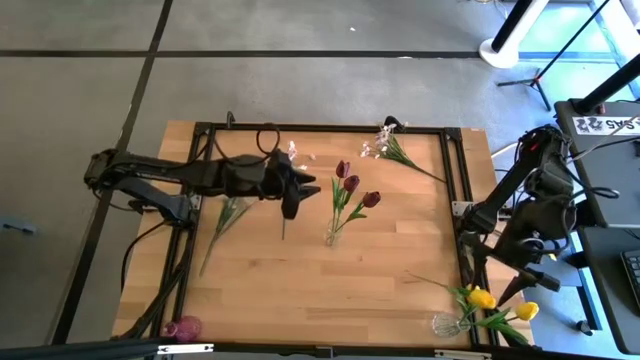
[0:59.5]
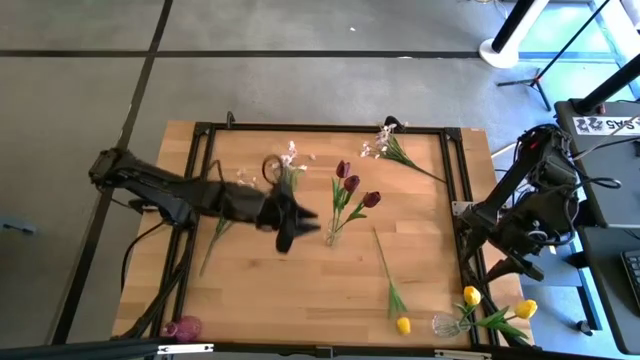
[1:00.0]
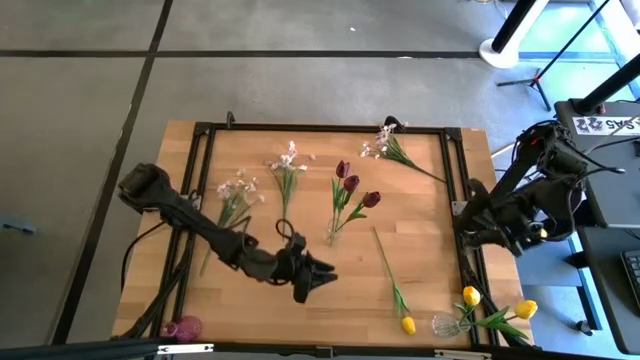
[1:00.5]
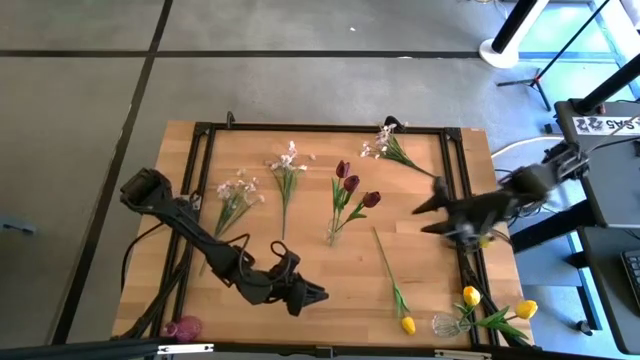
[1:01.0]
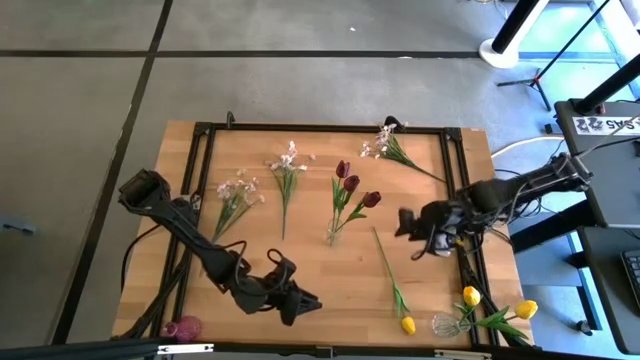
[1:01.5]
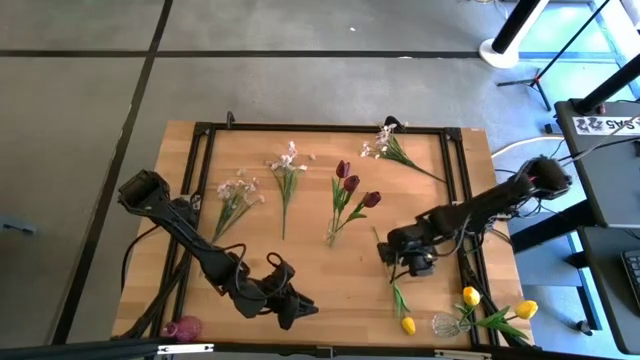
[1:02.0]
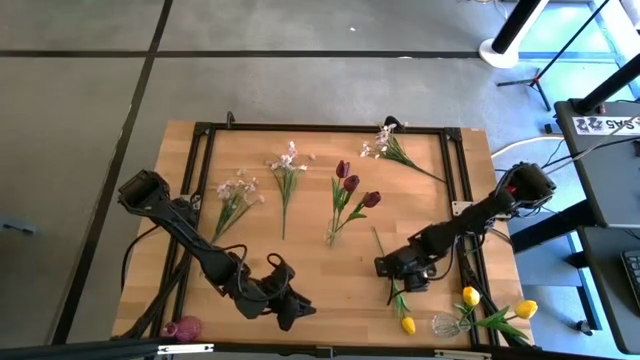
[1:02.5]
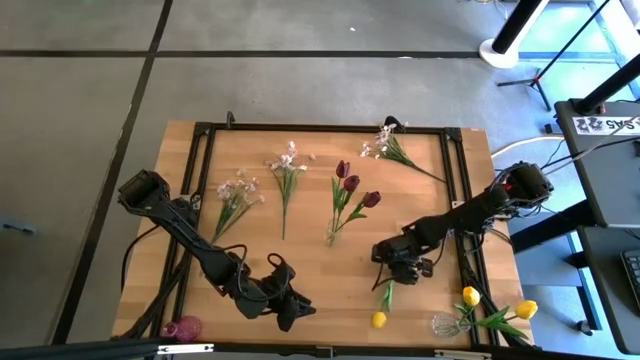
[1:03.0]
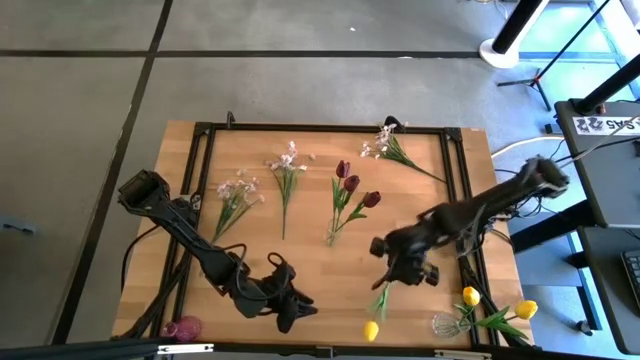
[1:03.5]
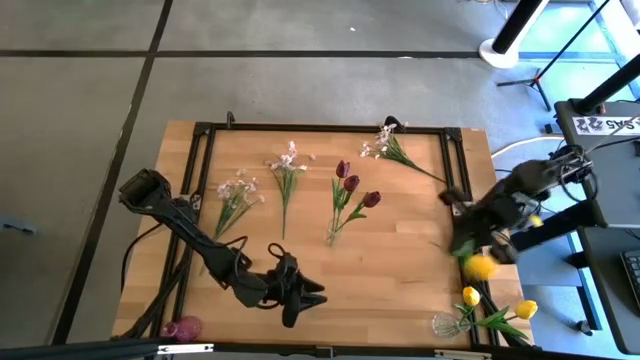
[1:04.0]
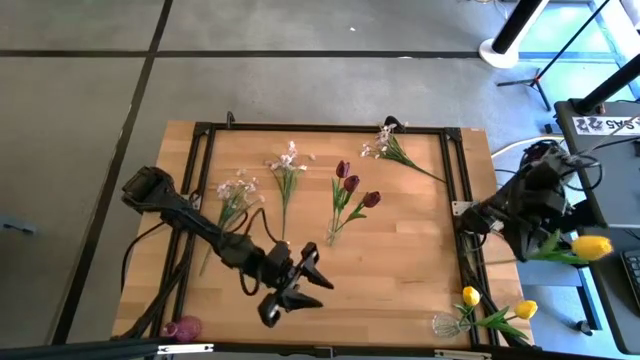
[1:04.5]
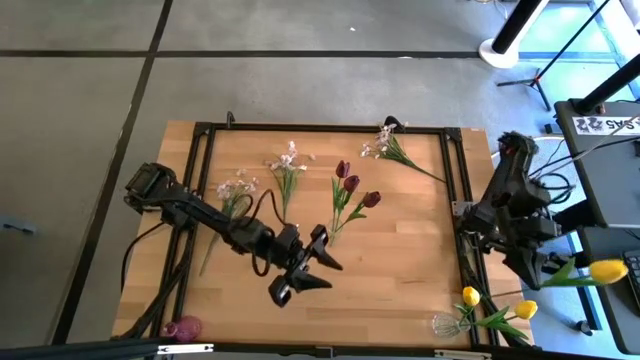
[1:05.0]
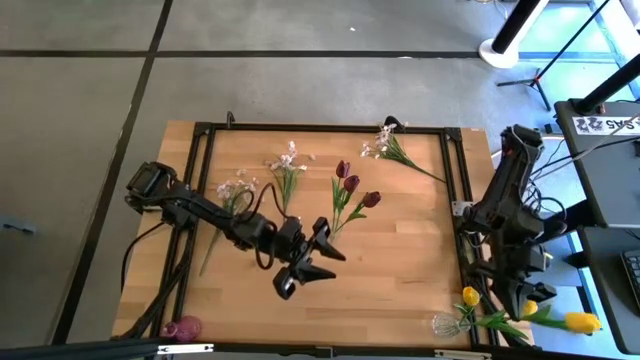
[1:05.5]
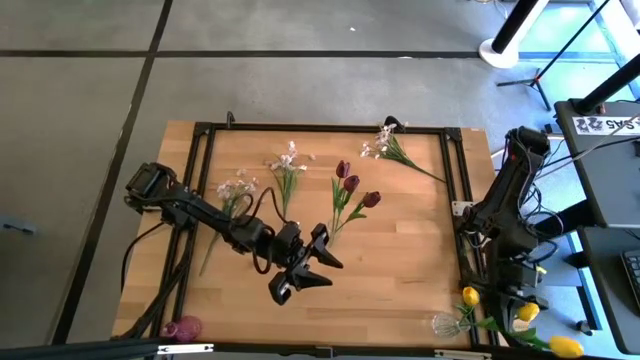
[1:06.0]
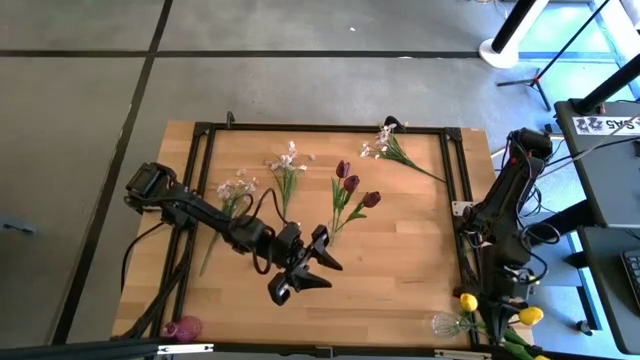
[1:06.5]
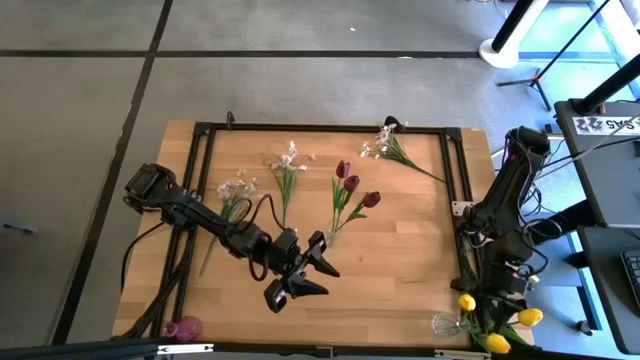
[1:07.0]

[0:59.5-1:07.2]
Task: Sort flowers into vase by color
Put the yellow tulip into the bottom transparent vase

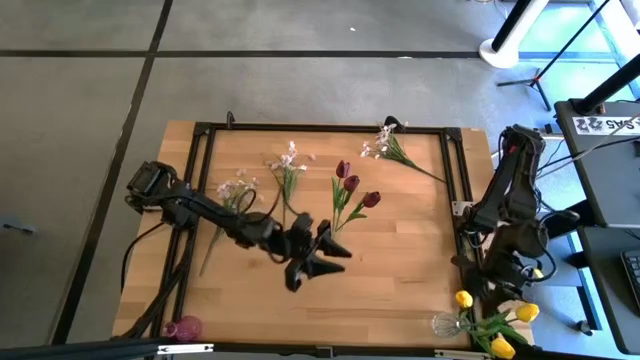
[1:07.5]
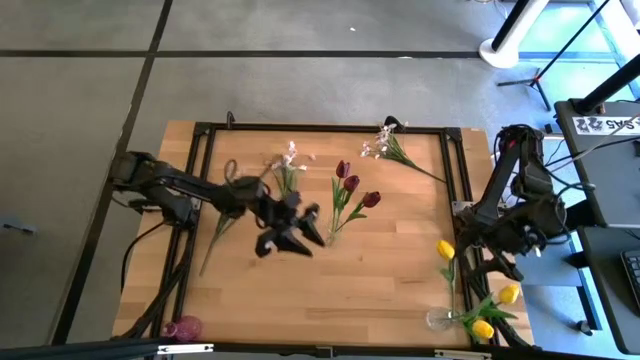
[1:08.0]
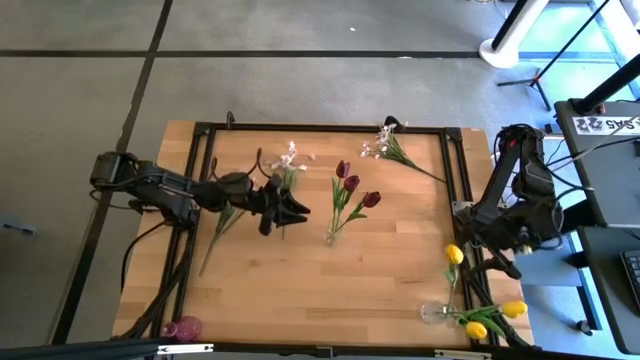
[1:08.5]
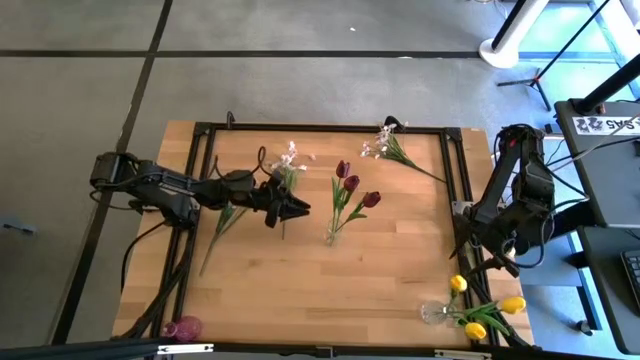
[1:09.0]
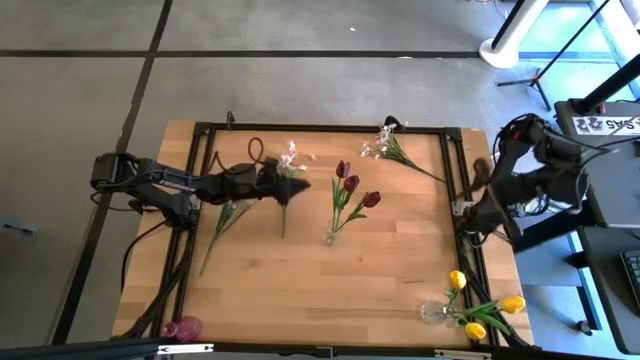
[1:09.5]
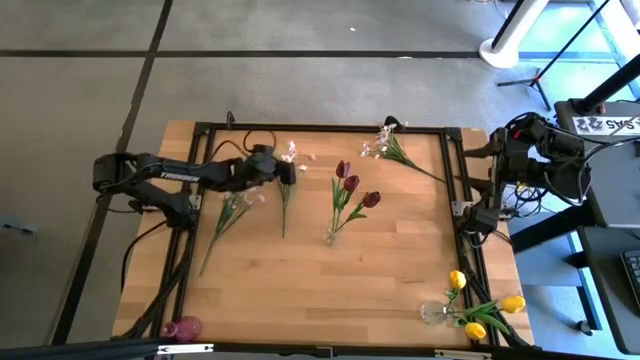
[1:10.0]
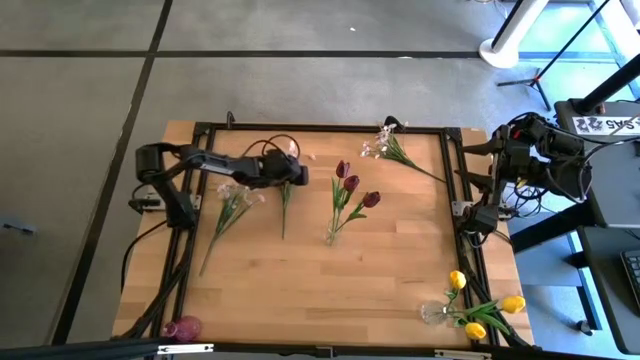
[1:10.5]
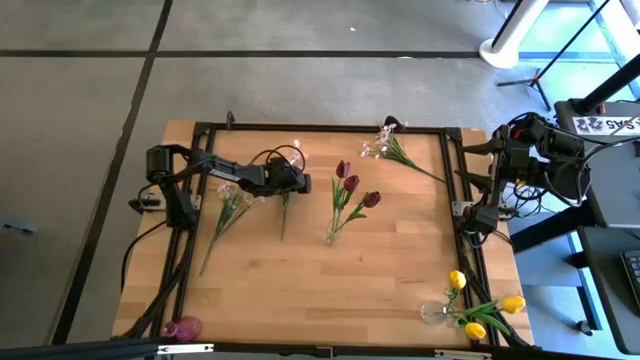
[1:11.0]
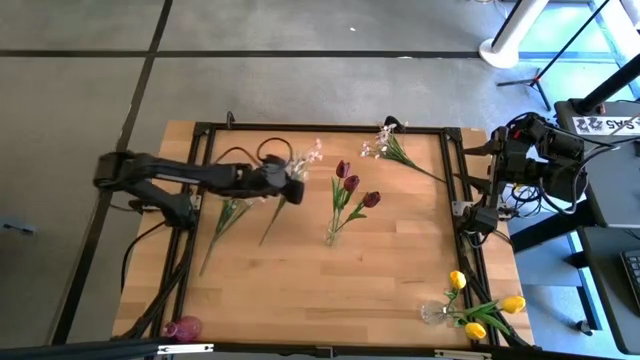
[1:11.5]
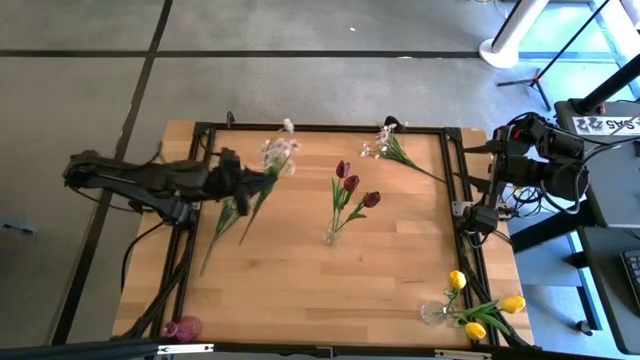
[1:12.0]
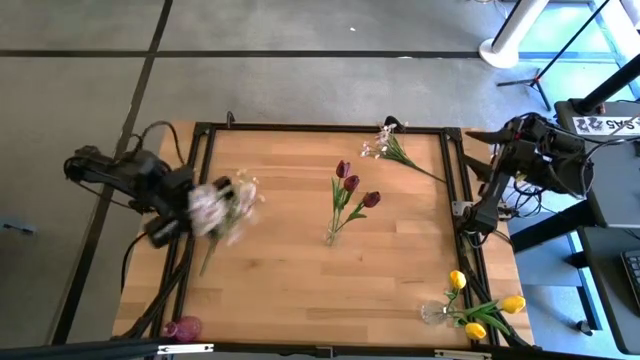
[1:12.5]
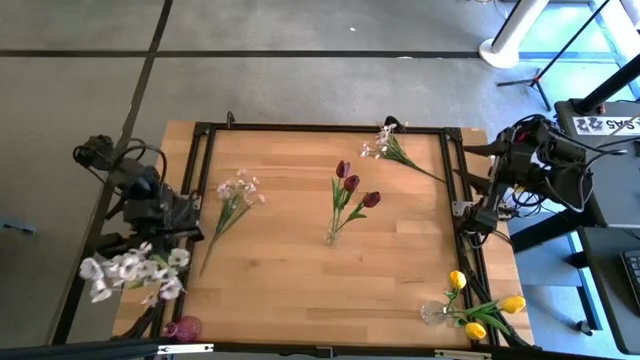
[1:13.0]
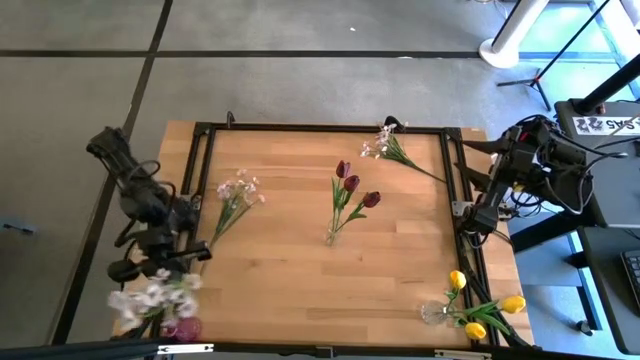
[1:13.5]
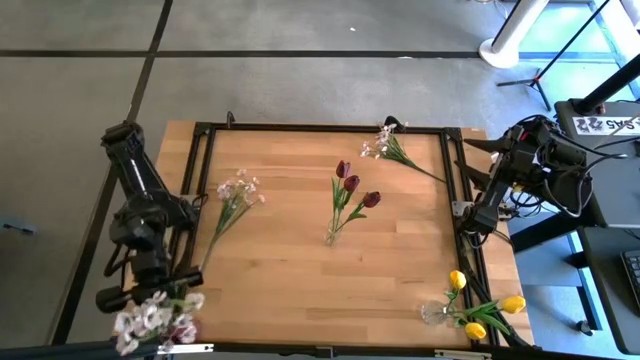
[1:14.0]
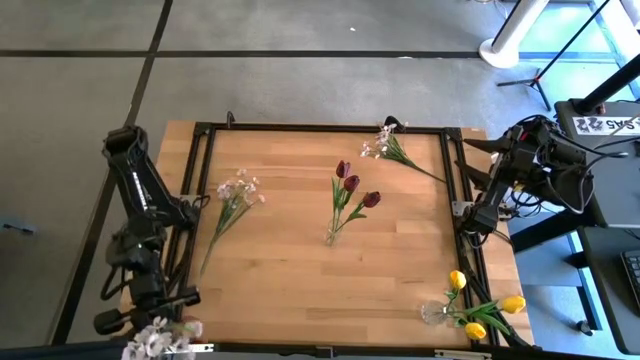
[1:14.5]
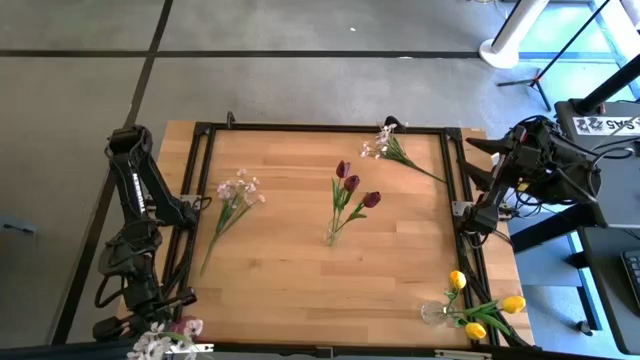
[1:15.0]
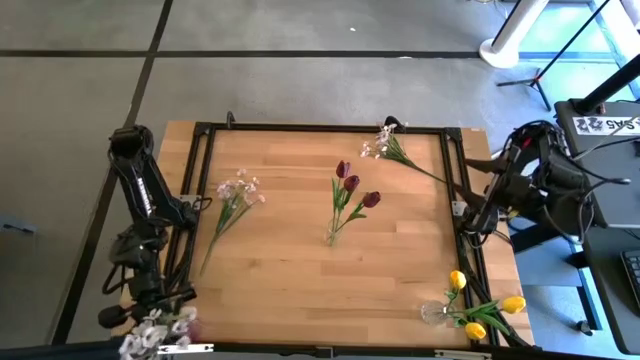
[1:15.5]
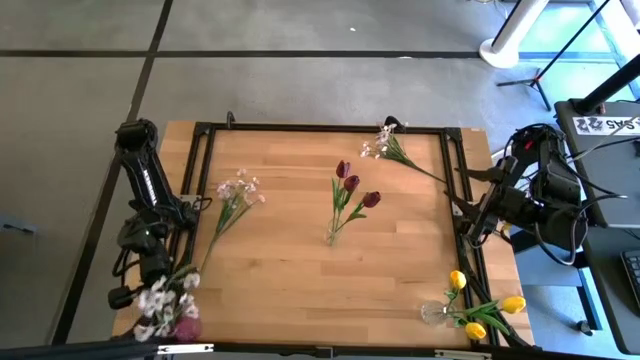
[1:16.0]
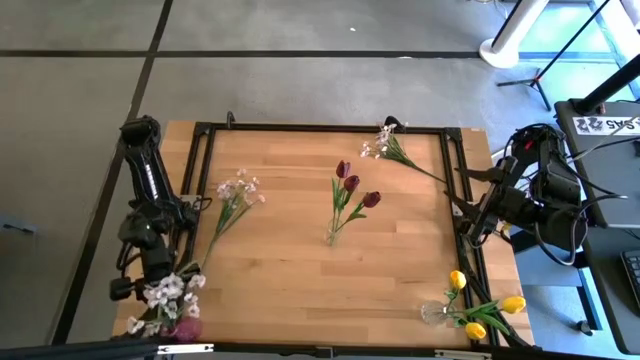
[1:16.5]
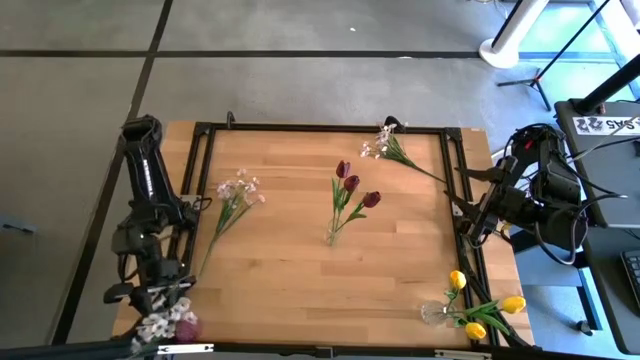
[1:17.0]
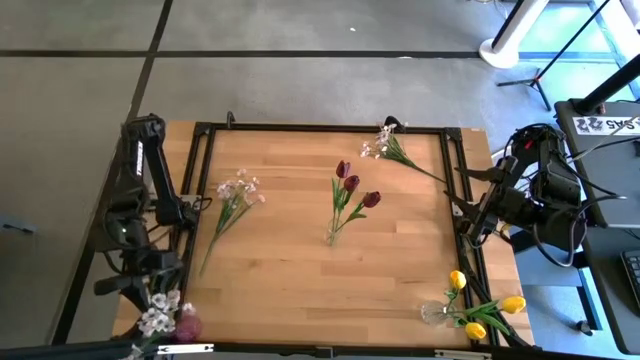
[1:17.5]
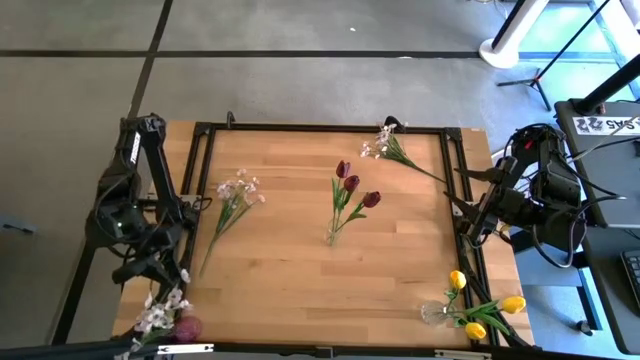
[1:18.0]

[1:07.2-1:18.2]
Put the middle white flowers into the purple vase

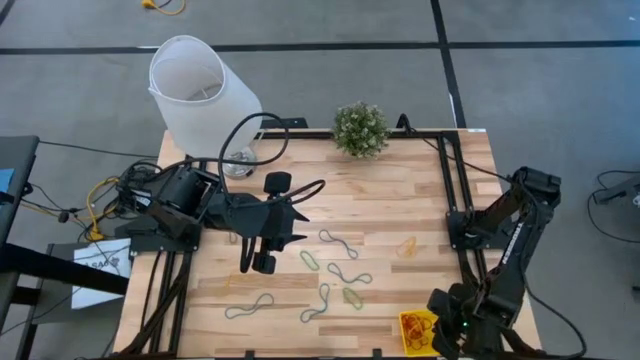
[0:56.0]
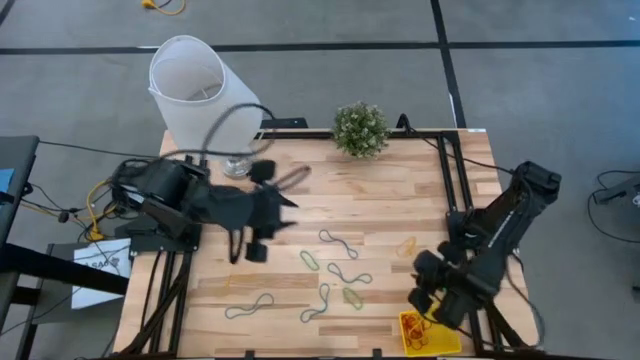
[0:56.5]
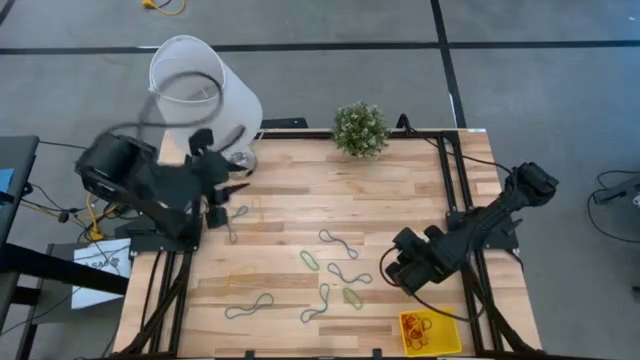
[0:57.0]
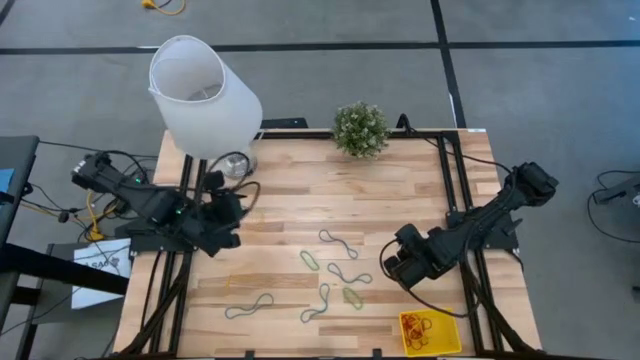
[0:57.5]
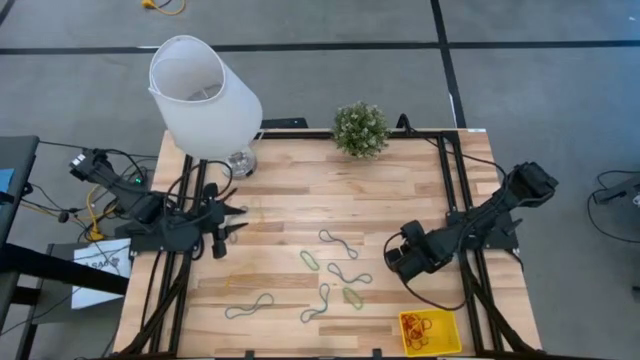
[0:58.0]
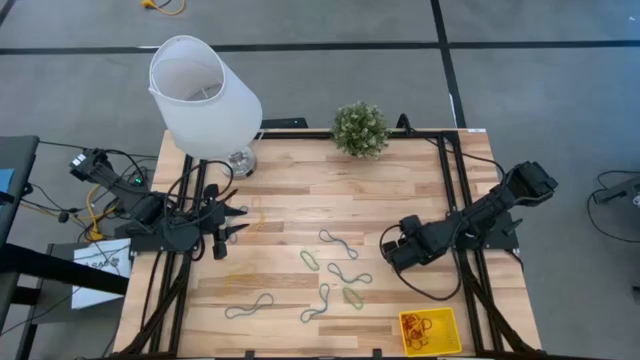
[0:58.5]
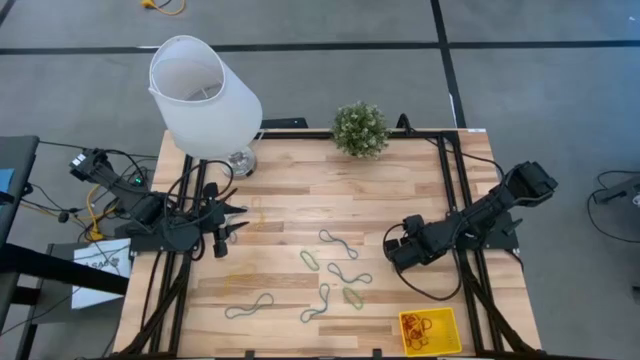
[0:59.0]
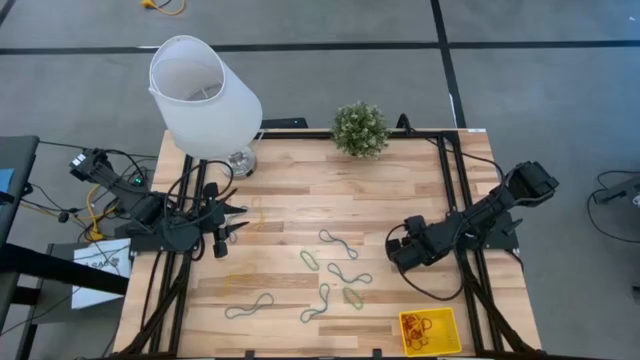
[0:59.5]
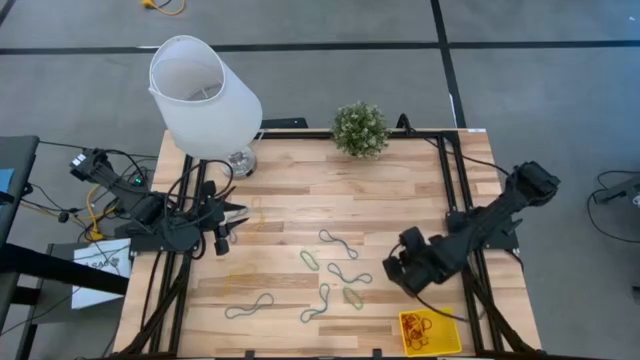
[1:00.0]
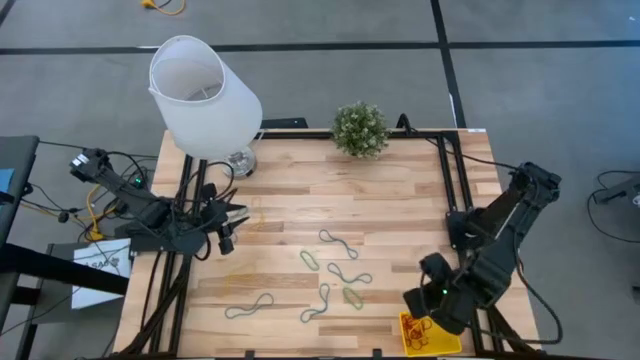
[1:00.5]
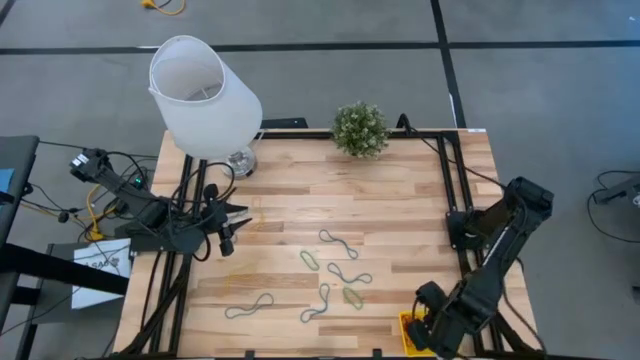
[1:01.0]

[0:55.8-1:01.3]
Task: Pick and place rubber bands into bin
Put the yellow rubber band into the yellow basket
